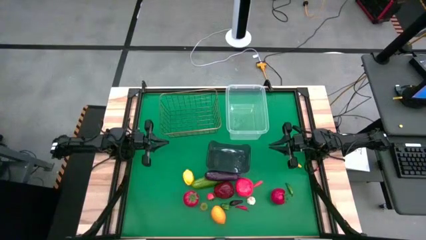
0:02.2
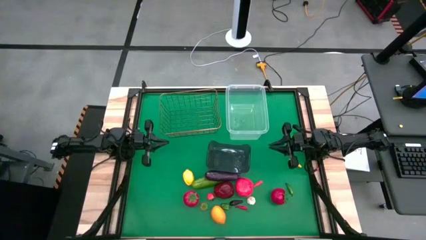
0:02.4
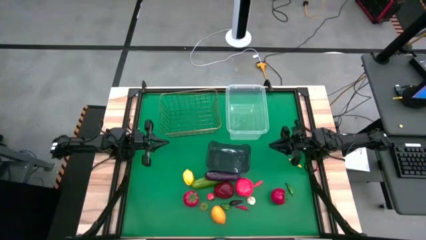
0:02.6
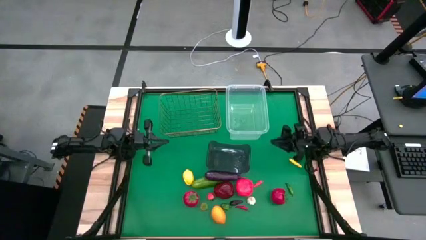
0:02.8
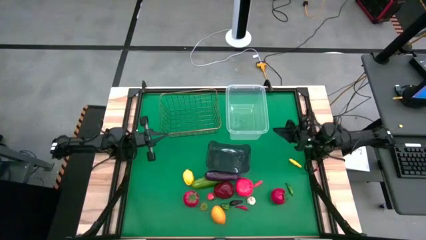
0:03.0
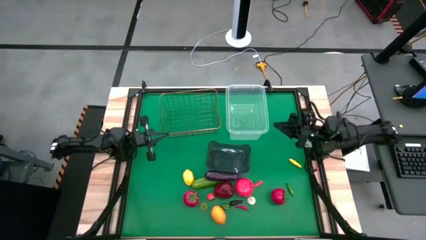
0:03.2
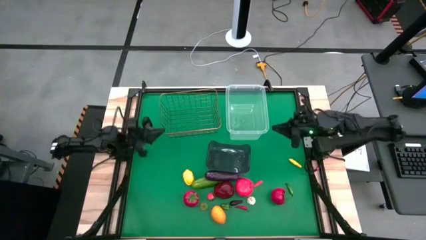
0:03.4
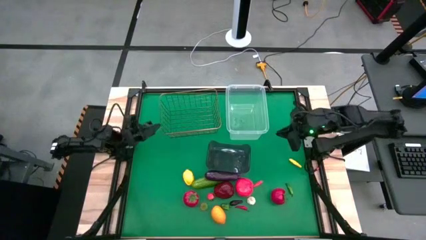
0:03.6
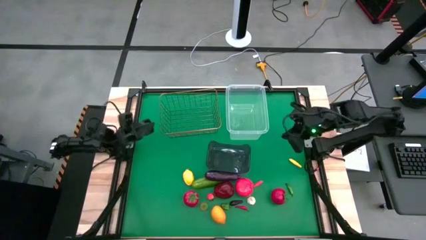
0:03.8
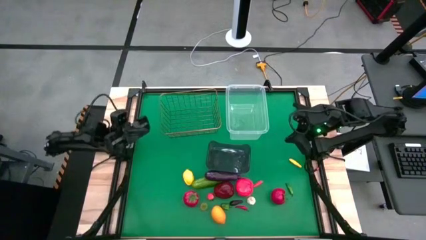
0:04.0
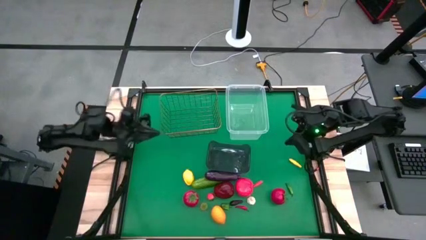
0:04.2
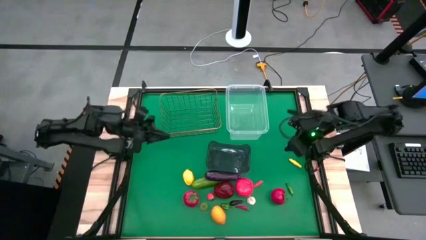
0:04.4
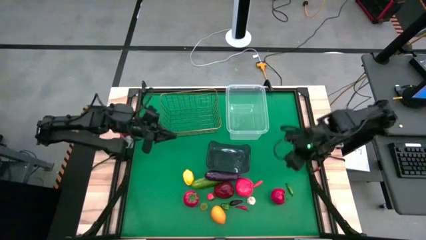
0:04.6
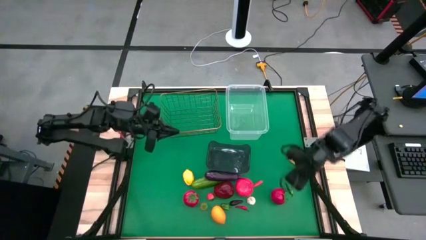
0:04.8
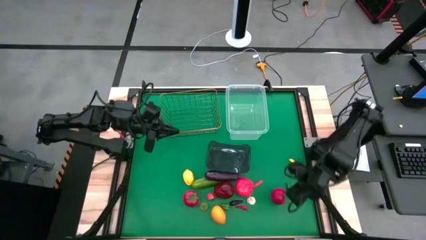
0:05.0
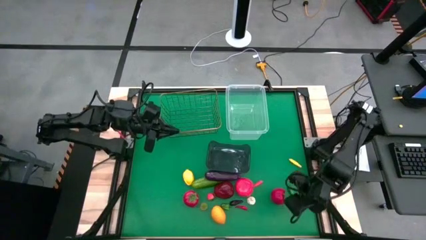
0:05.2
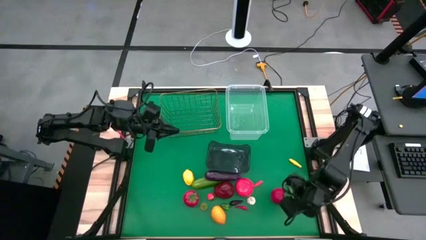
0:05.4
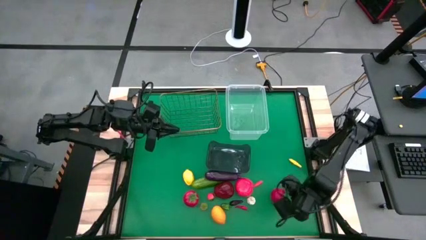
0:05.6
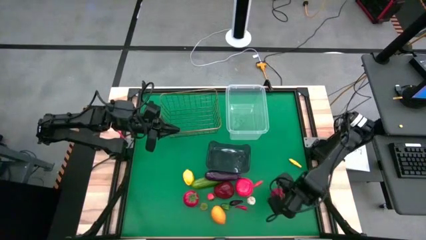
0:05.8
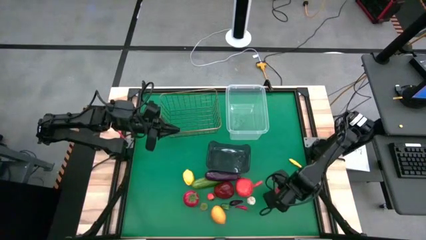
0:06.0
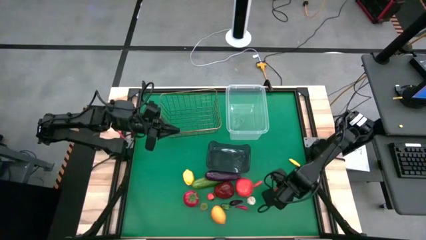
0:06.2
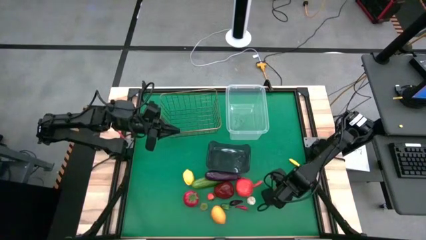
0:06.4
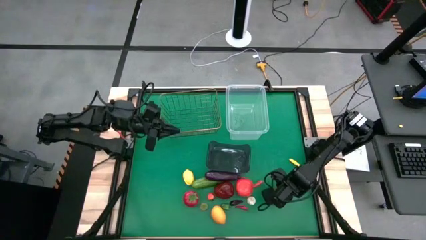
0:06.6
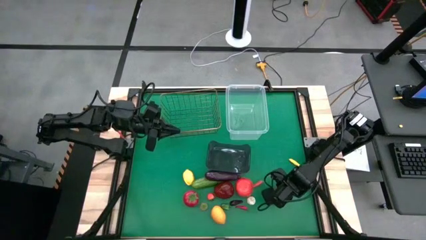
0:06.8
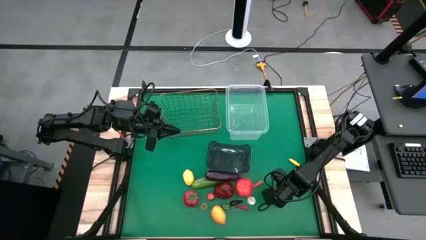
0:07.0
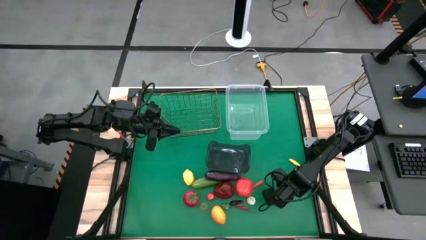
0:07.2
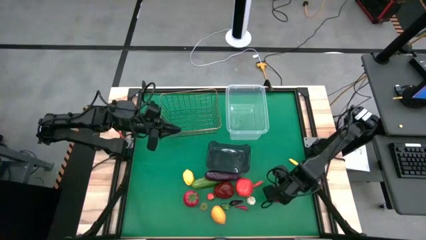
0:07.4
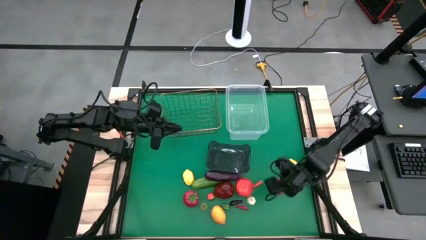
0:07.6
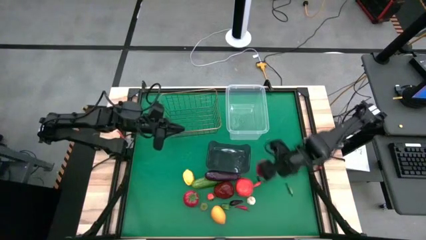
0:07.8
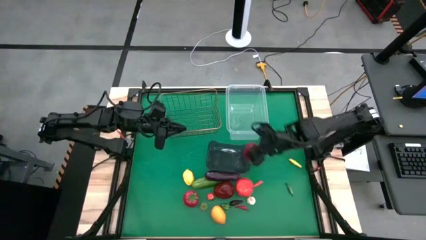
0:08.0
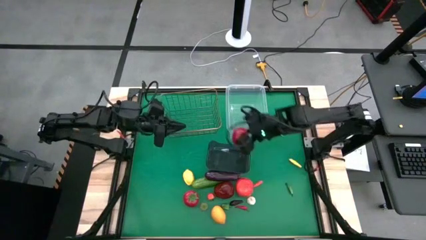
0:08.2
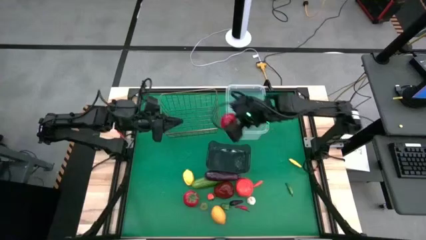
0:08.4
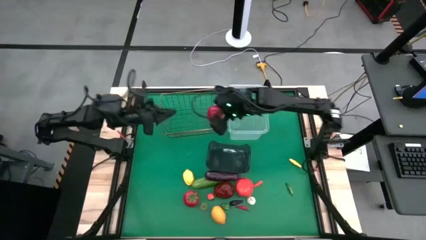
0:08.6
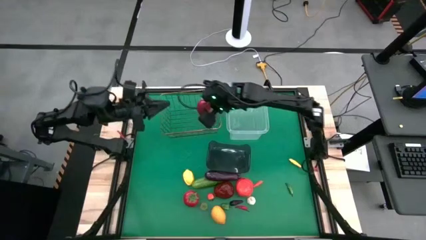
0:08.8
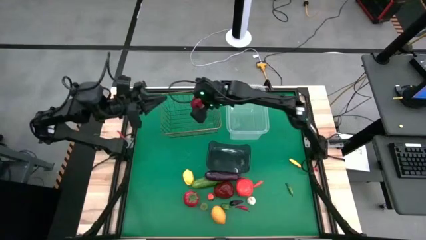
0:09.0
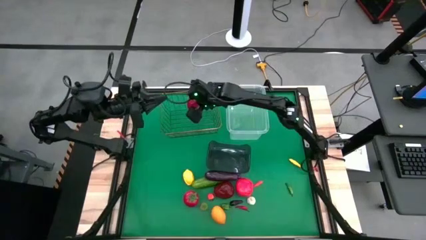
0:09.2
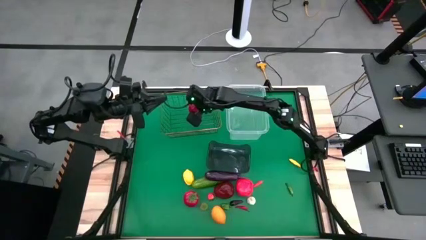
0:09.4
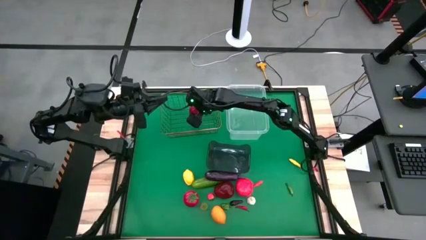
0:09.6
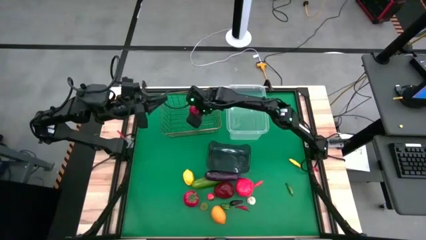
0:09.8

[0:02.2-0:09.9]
Task: Sort produce into baskets
Put the tomato into the wire basket

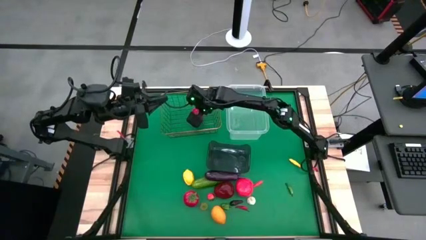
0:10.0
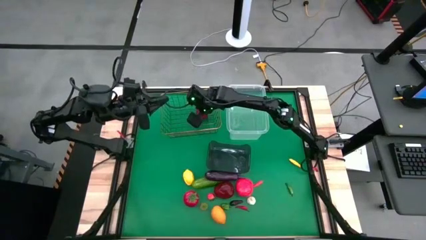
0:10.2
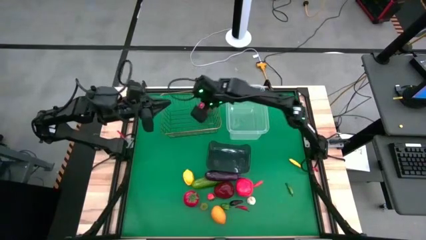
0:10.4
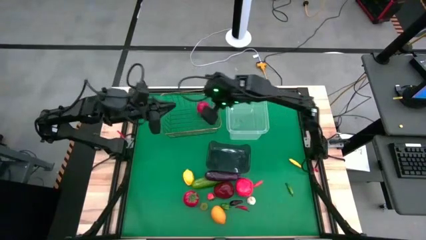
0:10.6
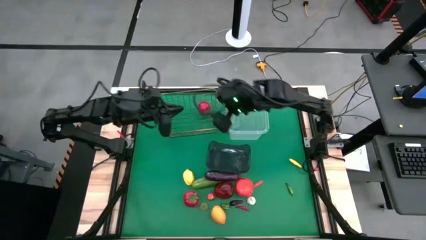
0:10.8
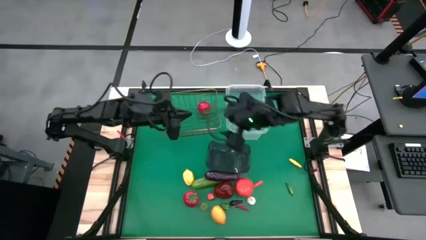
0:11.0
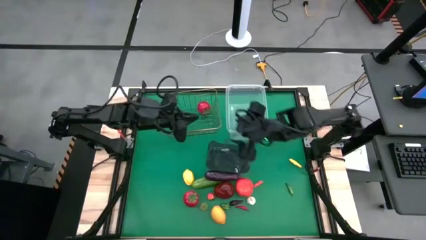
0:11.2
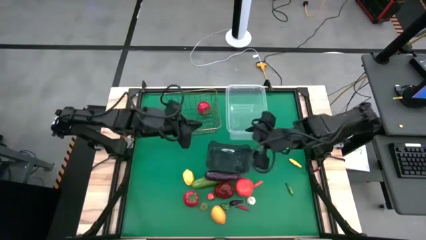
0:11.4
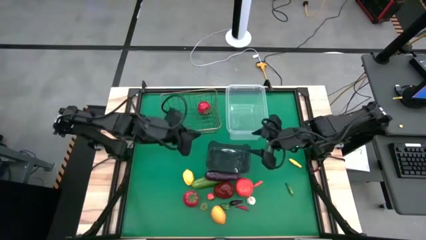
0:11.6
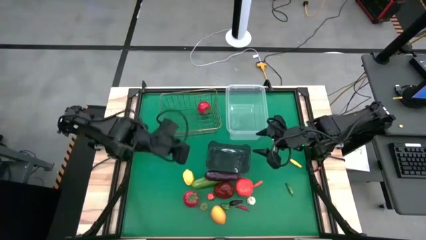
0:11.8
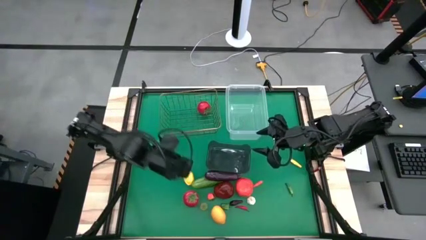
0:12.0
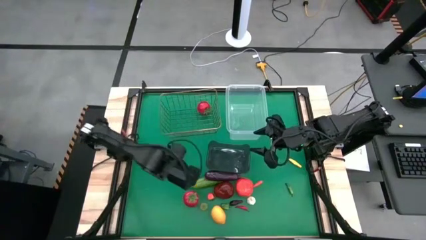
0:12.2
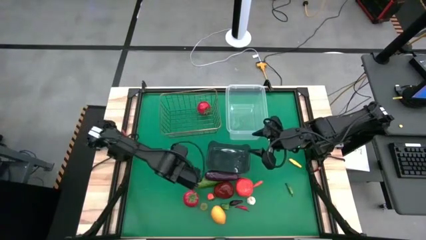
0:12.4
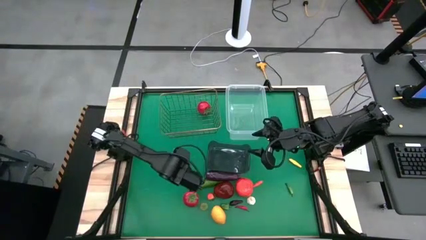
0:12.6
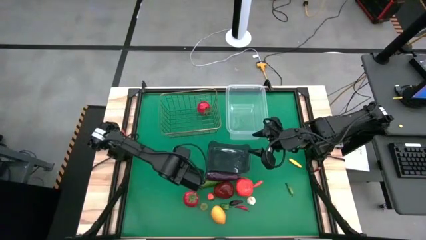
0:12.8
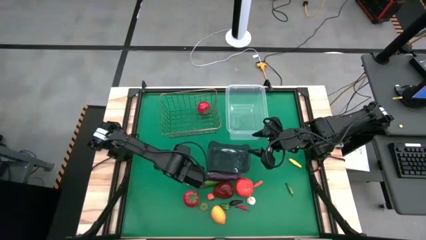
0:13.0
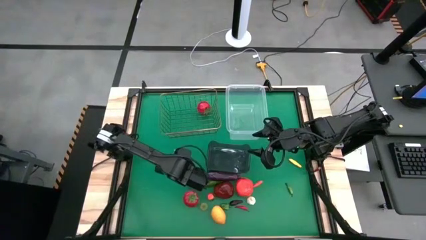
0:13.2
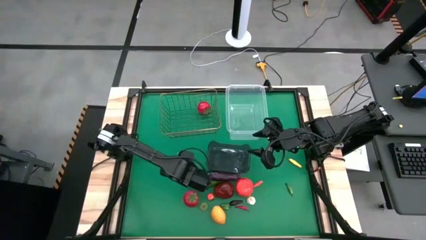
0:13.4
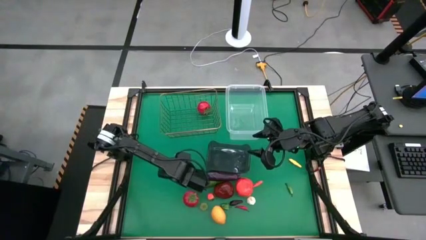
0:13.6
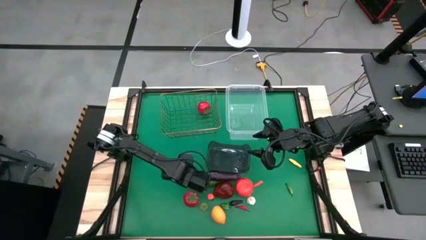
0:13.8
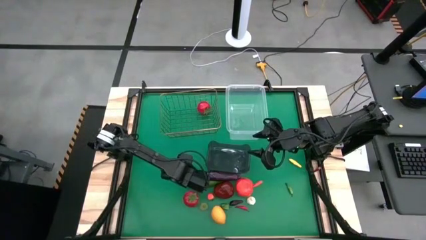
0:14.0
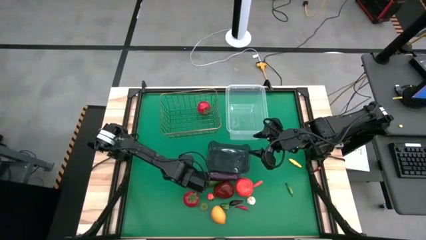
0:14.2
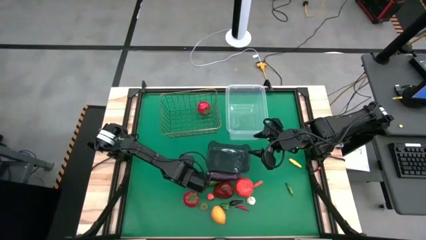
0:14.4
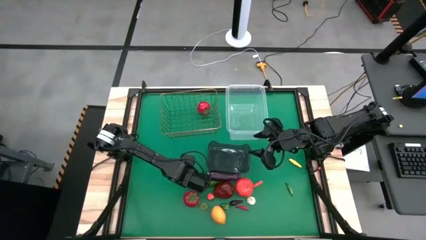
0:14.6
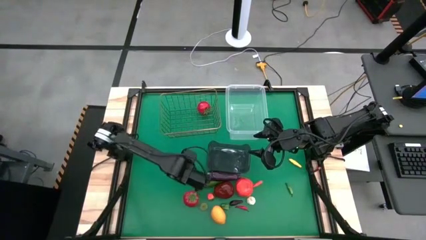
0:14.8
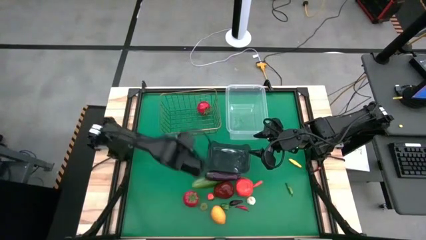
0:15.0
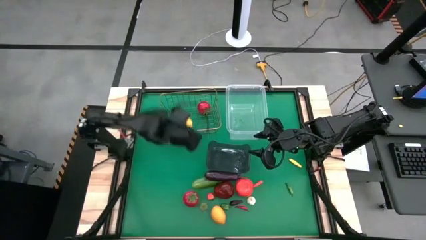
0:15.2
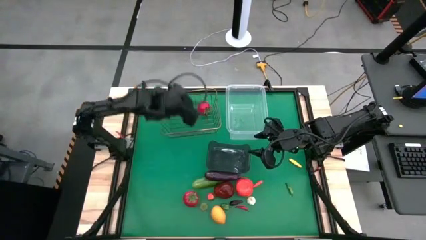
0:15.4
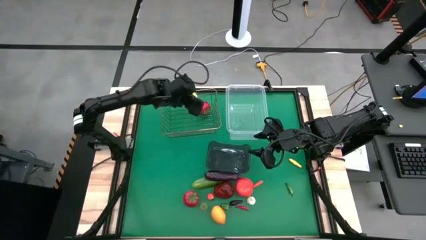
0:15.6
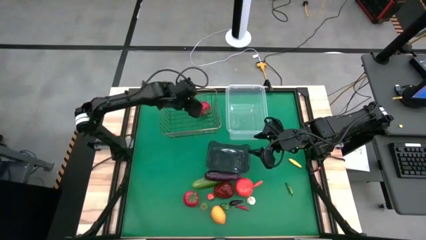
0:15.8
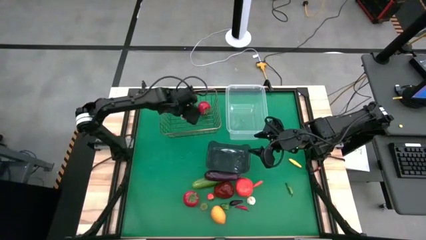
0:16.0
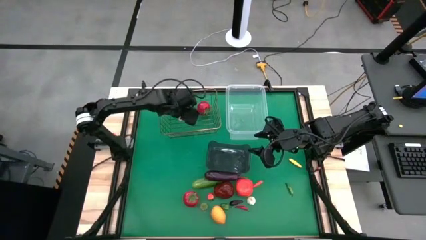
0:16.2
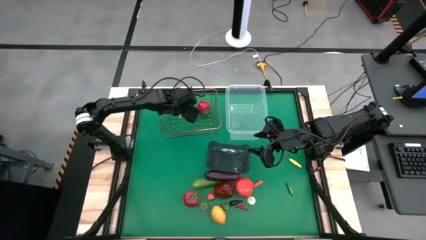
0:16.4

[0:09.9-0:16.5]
Put the lemon into the wire basket
